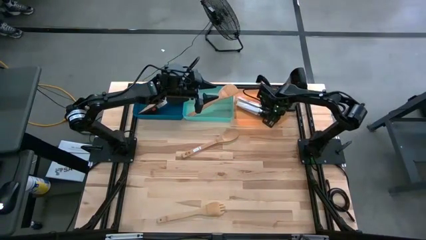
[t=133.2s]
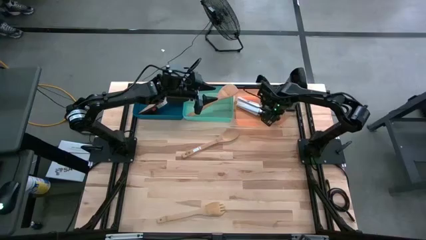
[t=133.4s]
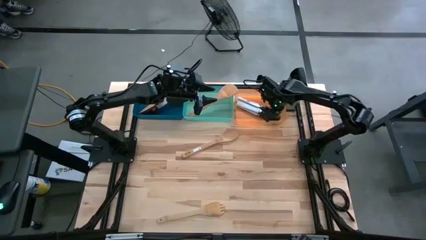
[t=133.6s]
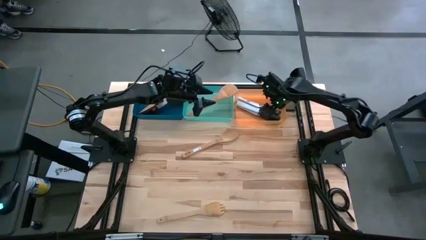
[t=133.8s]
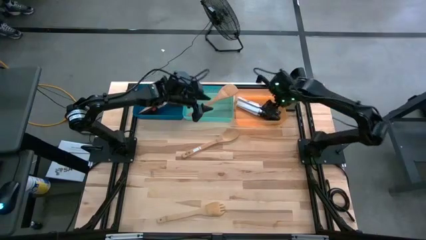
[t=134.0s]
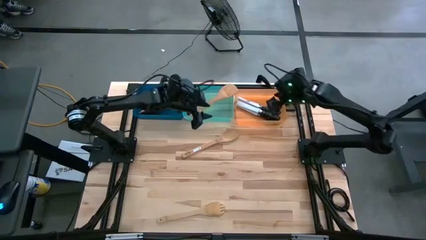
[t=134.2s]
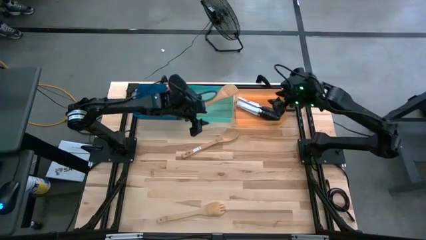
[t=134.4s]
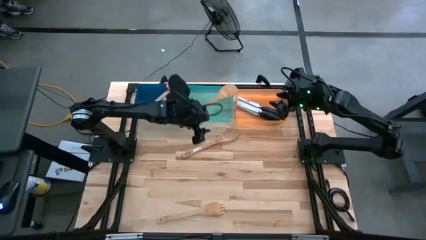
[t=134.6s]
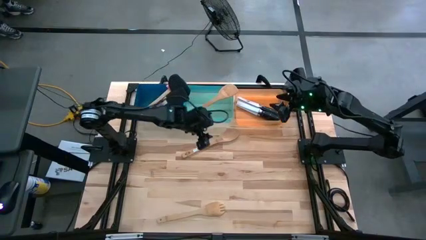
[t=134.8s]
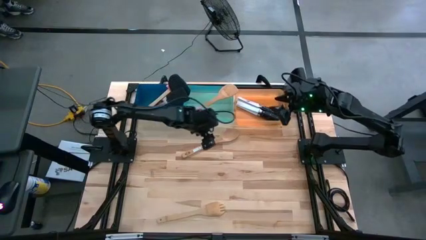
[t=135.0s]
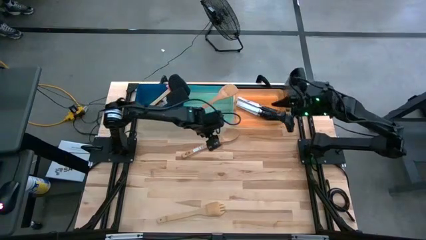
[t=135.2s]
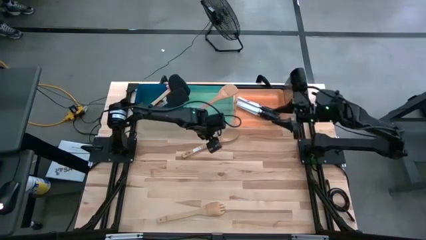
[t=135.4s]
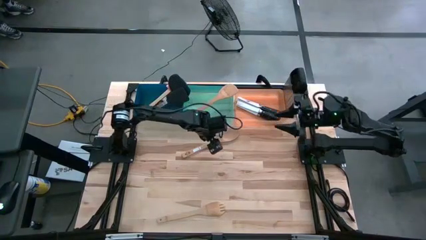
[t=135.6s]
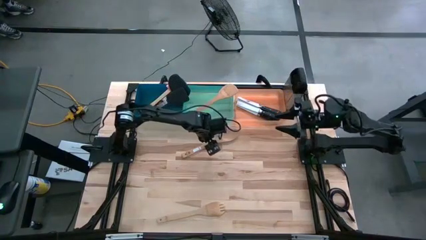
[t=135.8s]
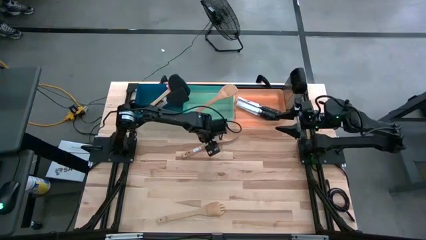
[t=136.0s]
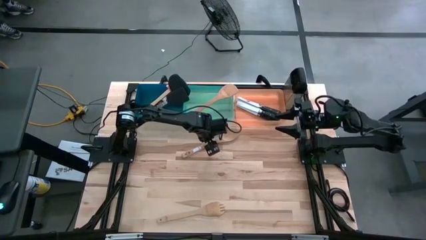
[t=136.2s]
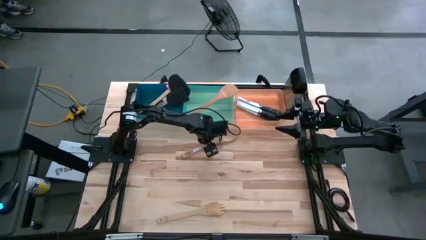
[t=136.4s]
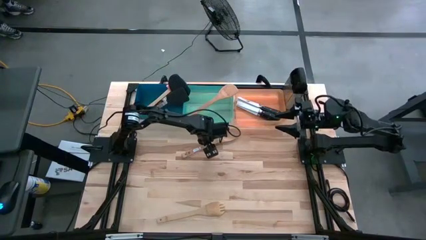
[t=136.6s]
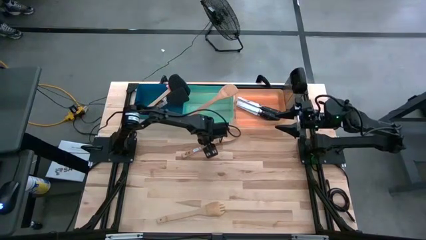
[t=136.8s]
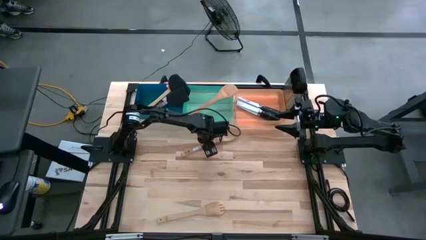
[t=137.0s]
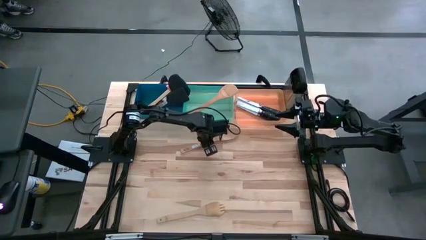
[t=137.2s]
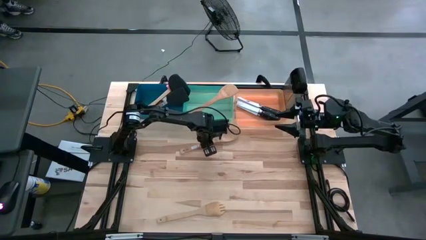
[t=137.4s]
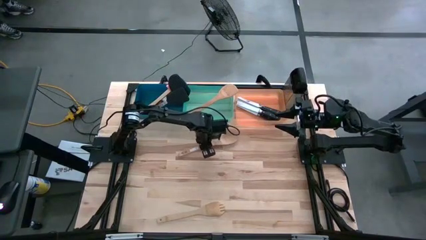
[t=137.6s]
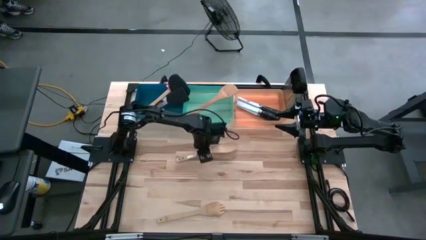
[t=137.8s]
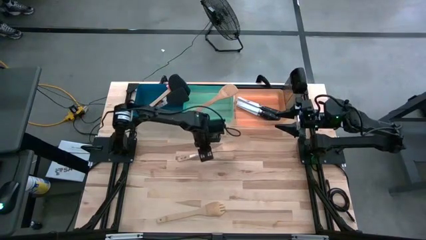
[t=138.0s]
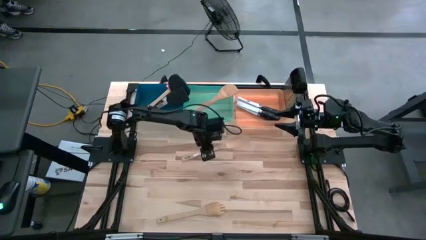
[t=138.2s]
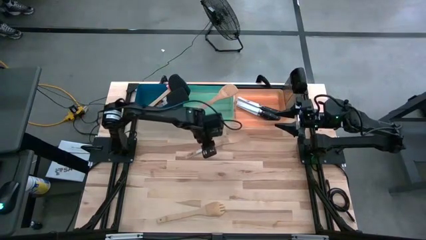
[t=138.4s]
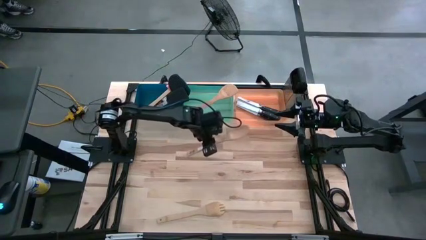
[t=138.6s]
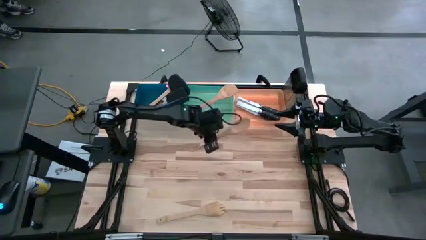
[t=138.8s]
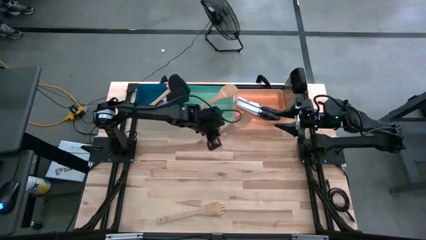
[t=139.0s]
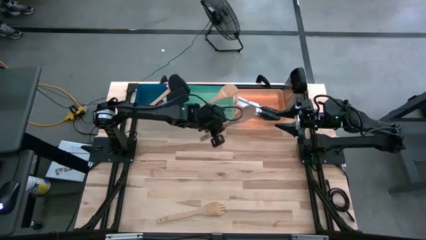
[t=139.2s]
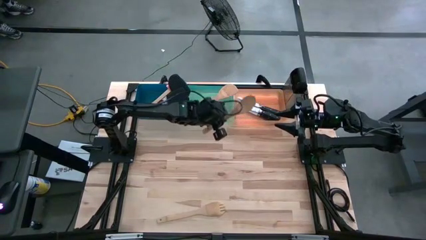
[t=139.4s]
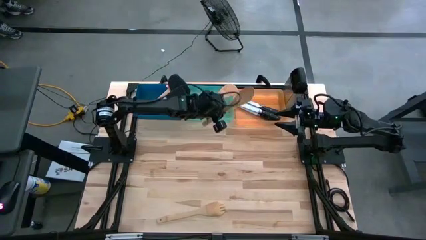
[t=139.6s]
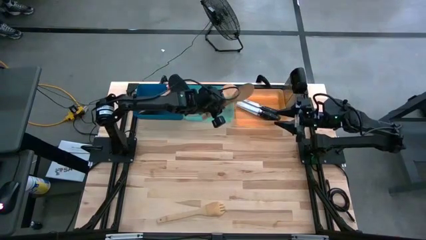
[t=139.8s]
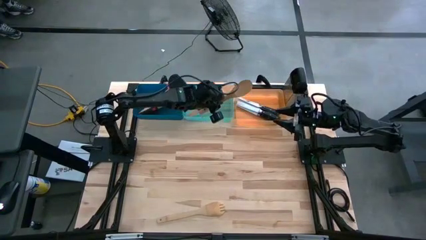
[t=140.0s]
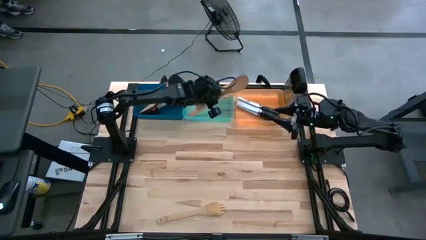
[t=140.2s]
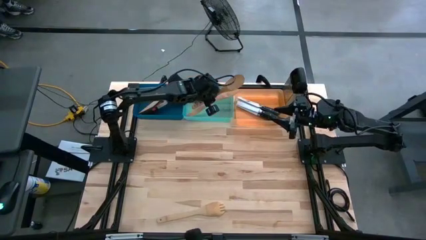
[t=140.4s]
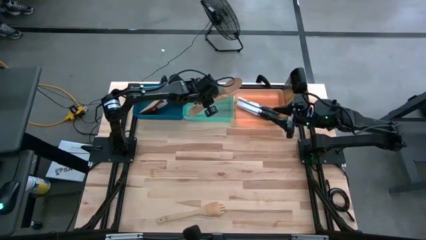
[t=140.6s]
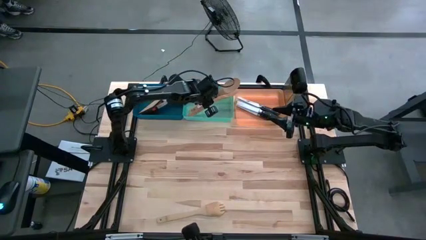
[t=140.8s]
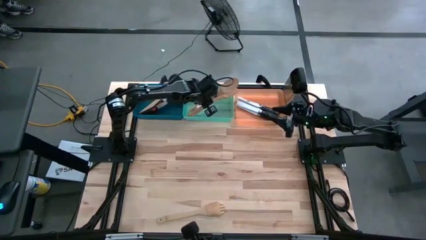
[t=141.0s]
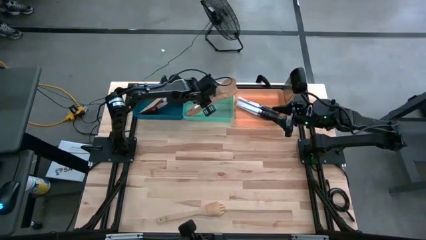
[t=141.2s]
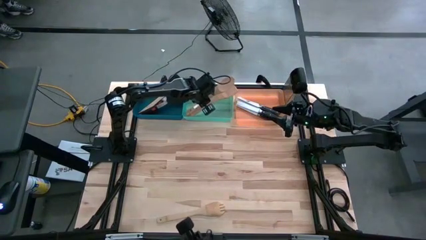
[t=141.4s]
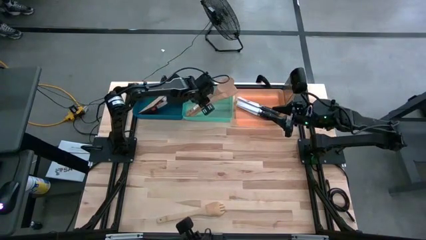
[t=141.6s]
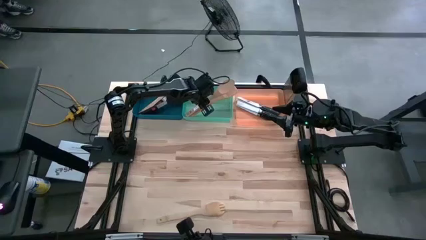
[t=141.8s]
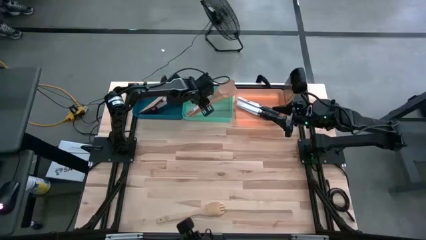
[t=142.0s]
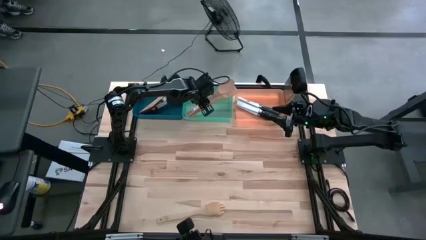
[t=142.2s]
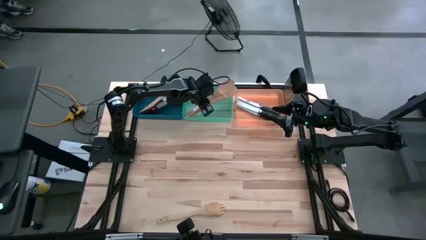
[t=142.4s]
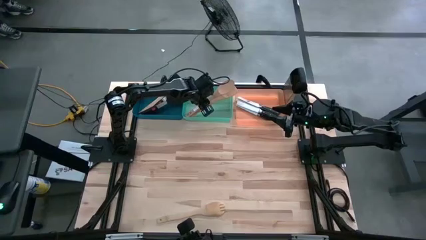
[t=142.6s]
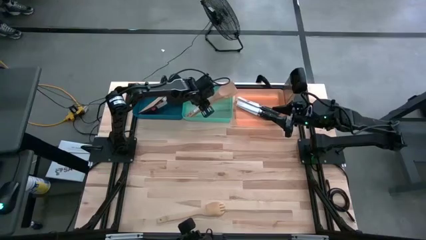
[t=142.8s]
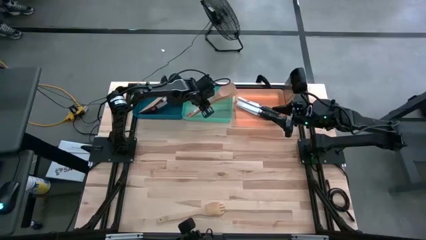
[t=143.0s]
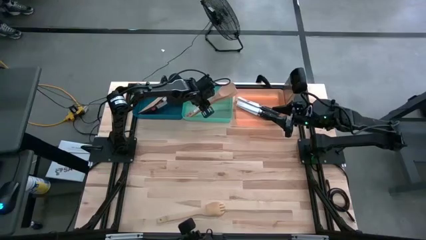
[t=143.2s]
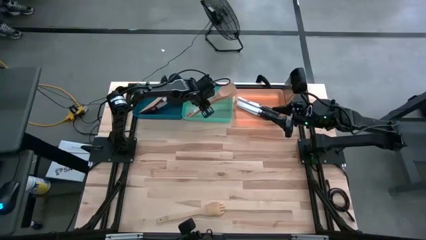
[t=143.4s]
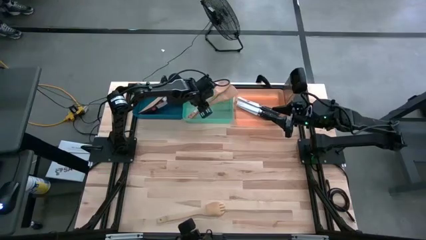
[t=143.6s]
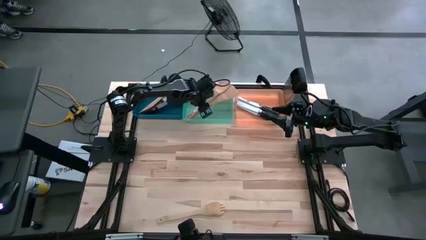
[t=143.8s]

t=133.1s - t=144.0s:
Task: Pick & Place Kitchen Items
Put the serving spoon into the green bin

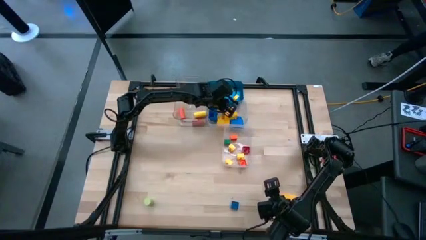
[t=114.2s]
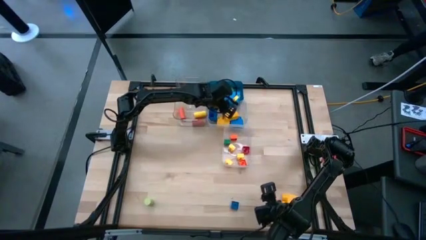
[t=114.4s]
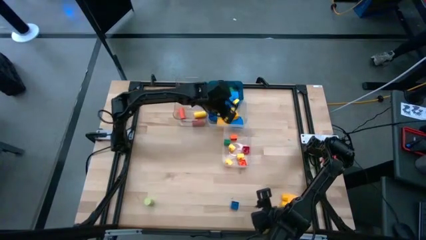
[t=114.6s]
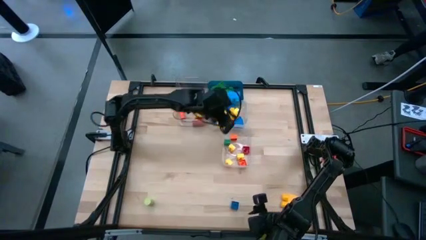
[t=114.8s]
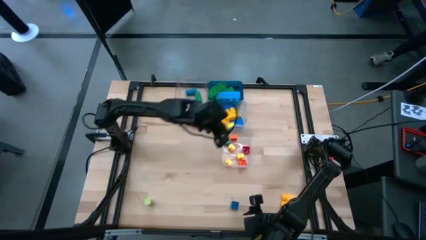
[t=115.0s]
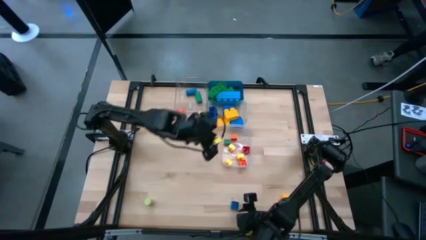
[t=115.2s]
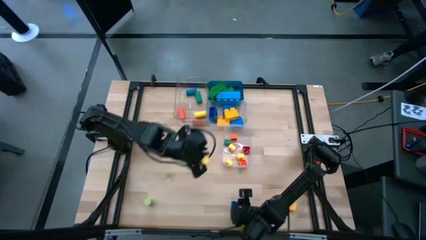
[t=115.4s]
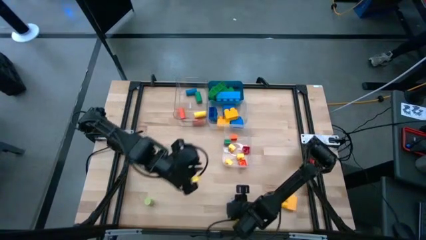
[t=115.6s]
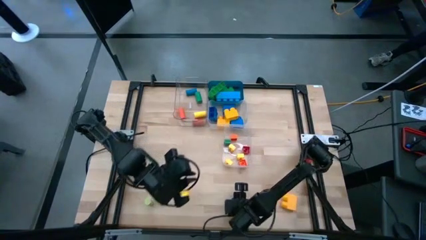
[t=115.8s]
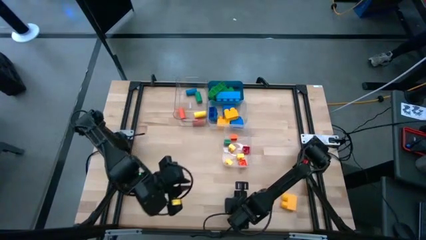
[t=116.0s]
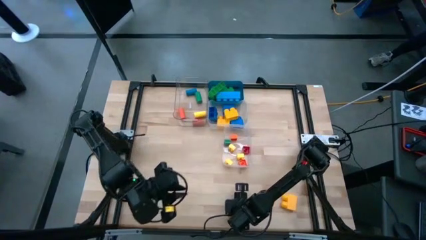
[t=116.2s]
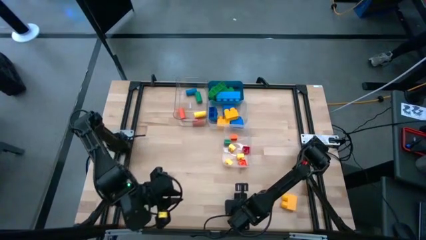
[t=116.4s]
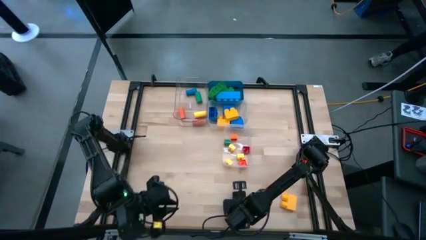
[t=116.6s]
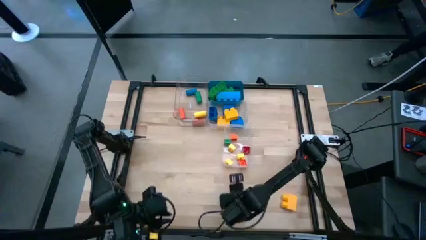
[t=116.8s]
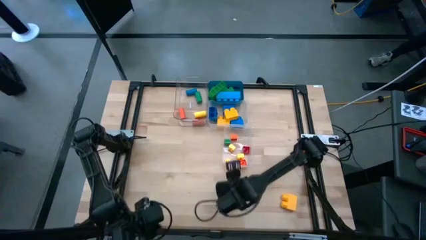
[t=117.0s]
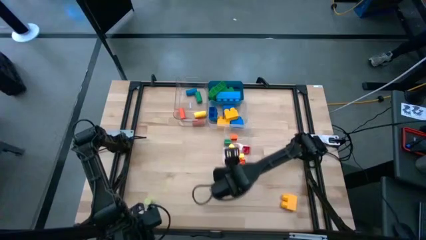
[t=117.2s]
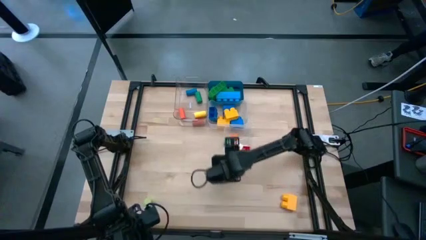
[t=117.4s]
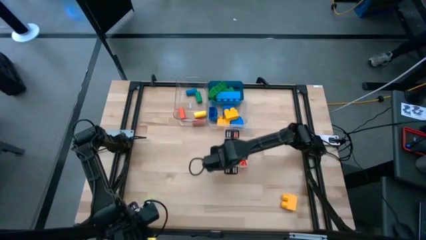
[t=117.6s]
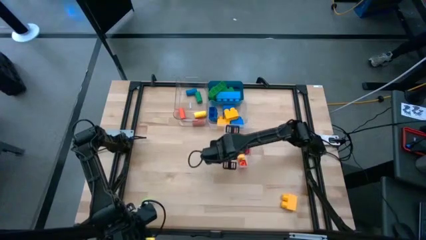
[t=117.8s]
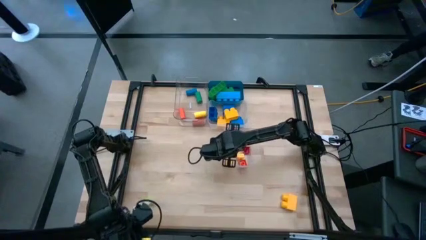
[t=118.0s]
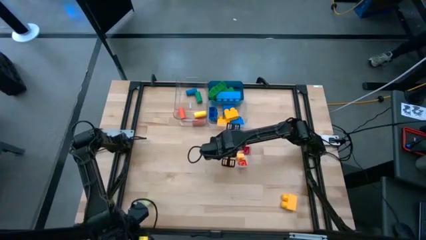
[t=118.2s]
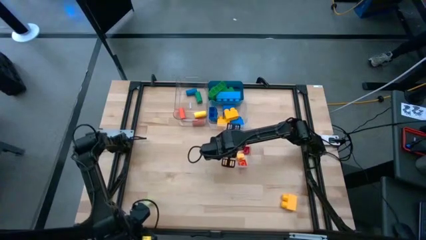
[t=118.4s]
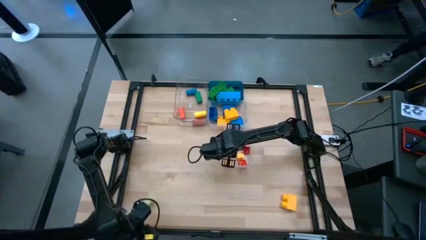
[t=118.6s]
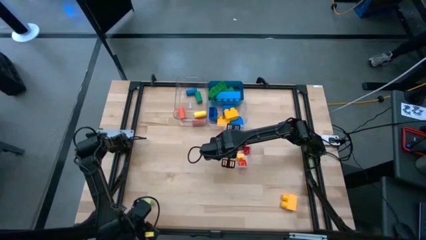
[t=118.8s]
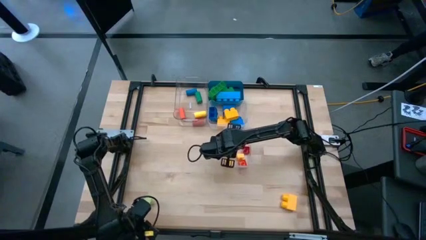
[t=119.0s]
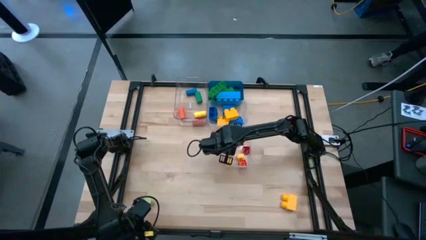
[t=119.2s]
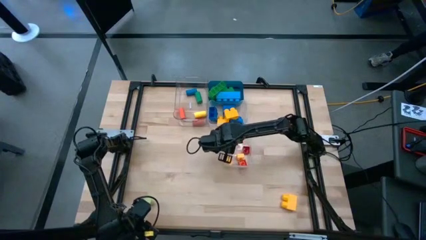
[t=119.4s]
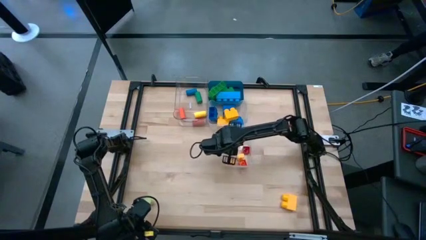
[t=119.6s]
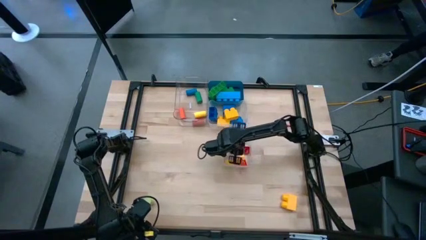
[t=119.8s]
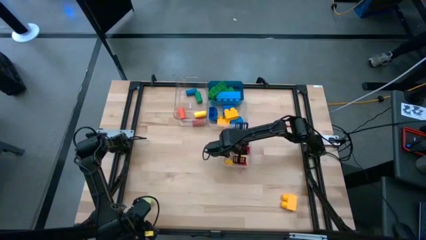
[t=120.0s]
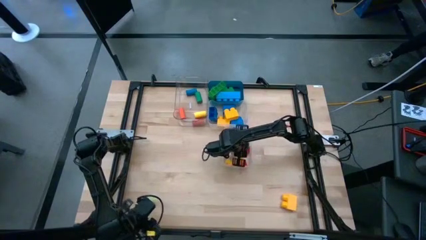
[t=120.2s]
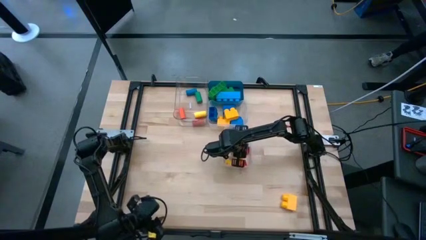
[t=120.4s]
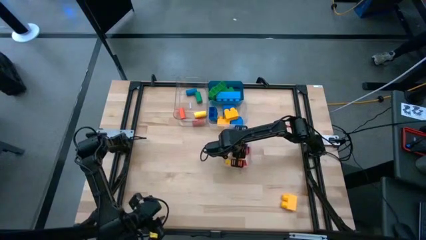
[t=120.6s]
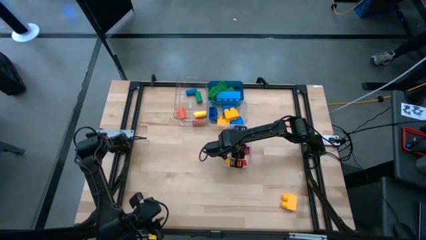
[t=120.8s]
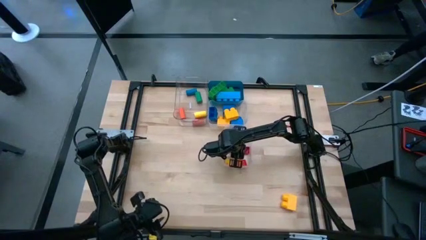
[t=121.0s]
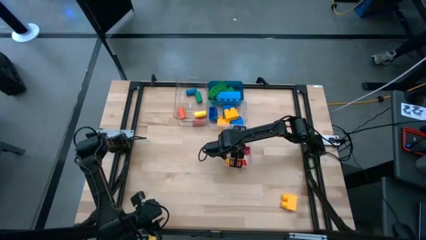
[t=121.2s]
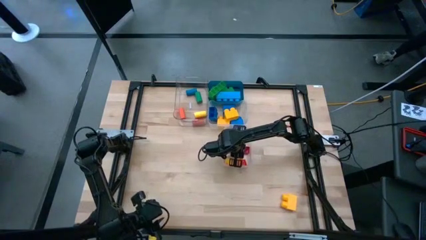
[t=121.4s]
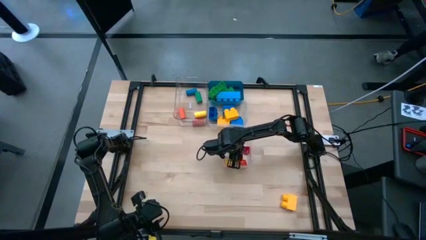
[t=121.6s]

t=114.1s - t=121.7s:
Task: Sort blocks by size
Put the blue 4 stud small game piece into the bottom right transparent bin
